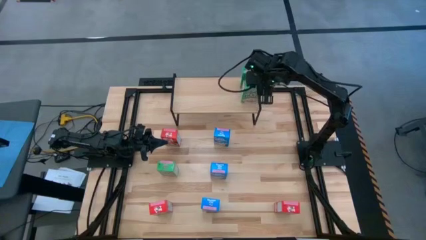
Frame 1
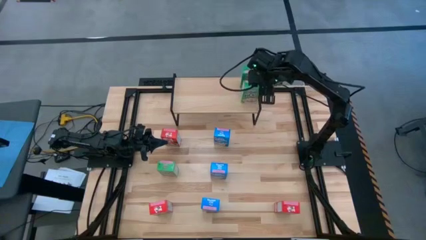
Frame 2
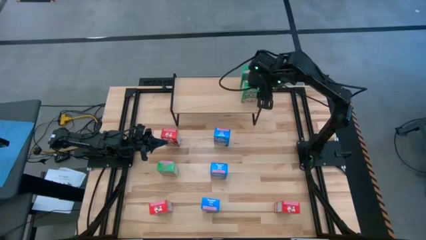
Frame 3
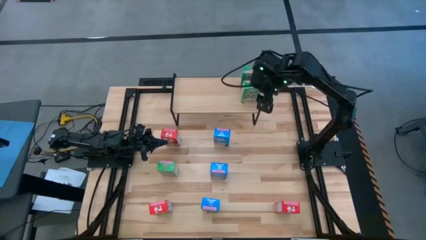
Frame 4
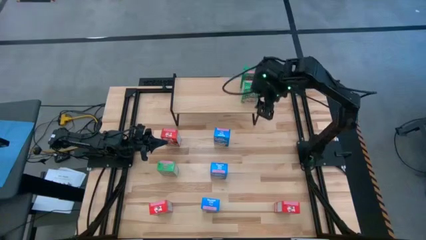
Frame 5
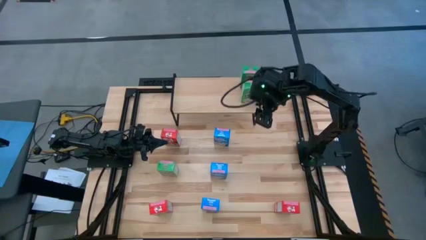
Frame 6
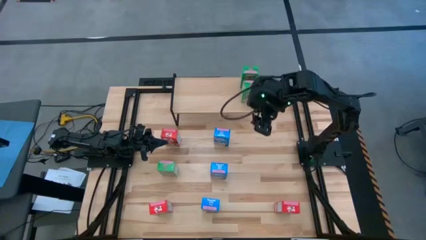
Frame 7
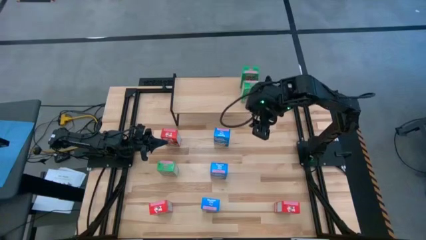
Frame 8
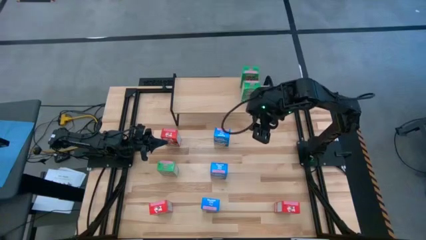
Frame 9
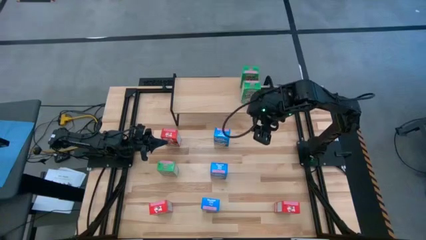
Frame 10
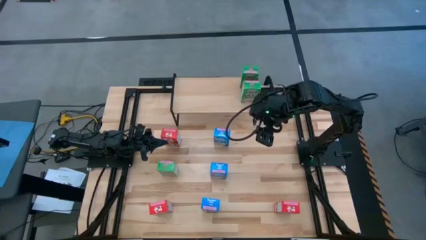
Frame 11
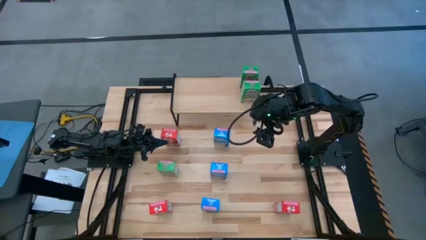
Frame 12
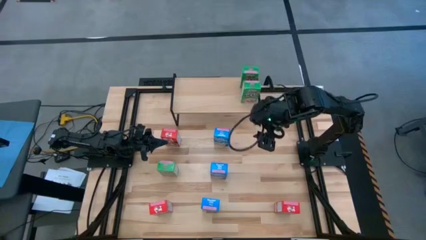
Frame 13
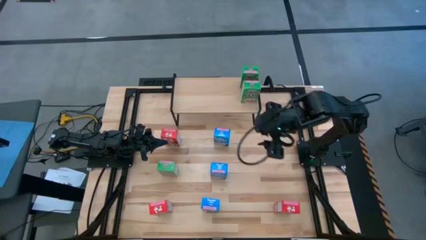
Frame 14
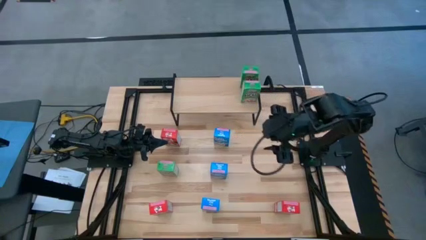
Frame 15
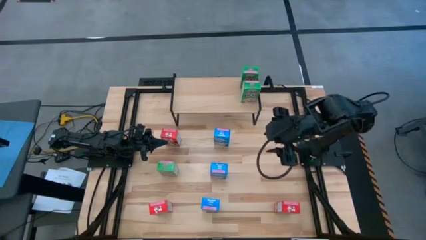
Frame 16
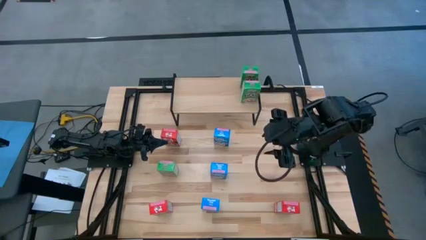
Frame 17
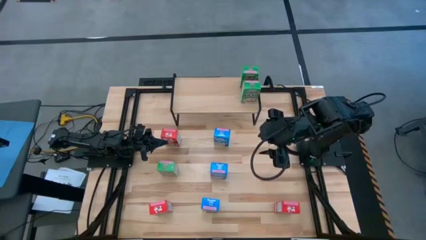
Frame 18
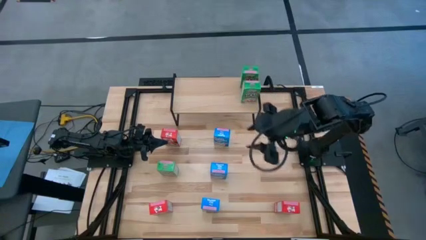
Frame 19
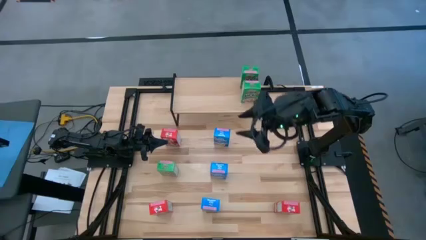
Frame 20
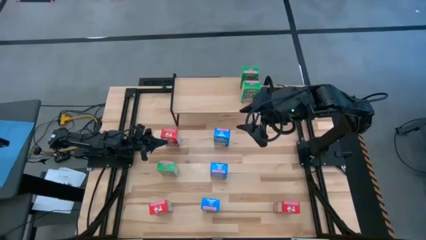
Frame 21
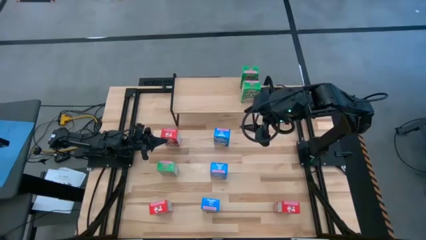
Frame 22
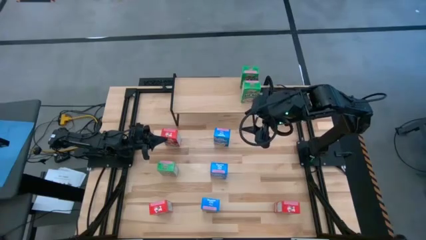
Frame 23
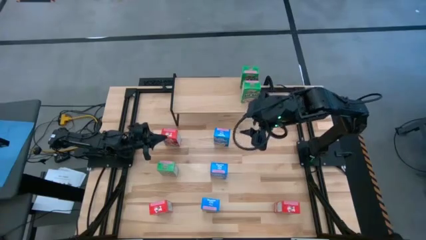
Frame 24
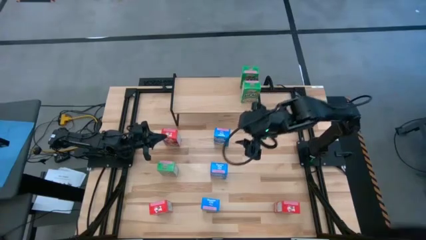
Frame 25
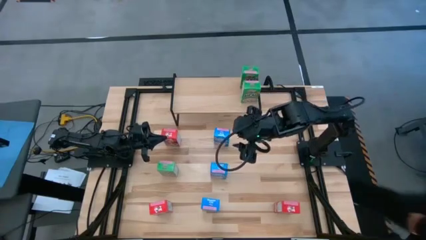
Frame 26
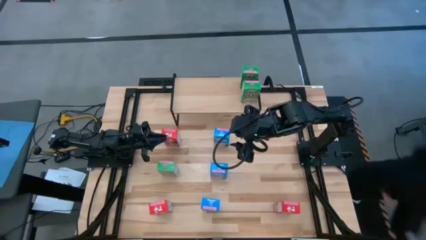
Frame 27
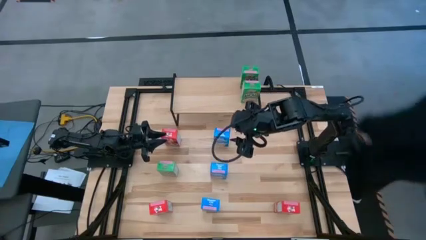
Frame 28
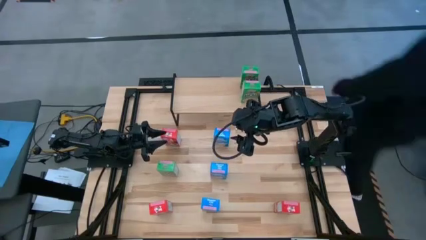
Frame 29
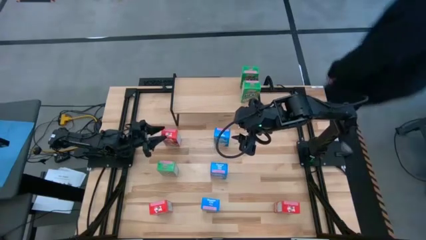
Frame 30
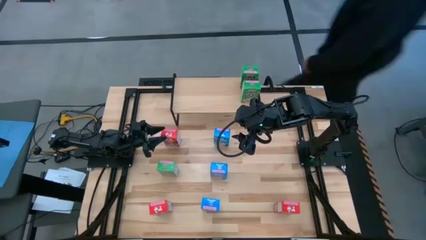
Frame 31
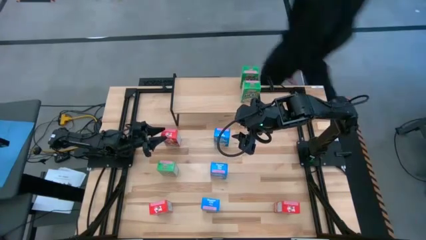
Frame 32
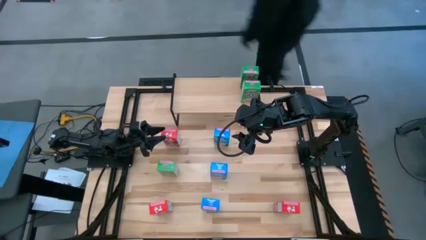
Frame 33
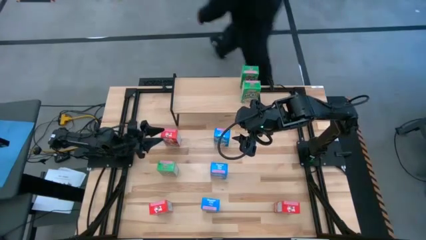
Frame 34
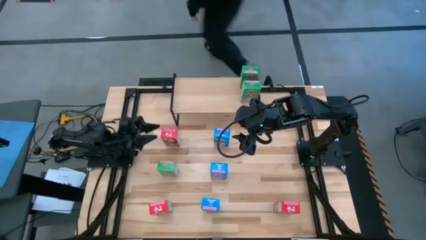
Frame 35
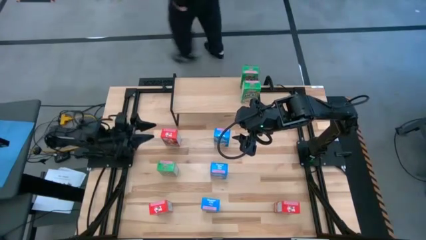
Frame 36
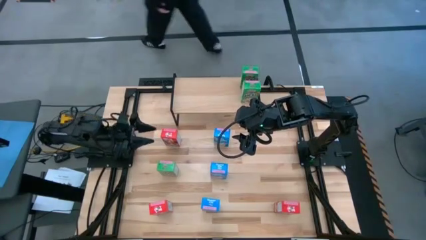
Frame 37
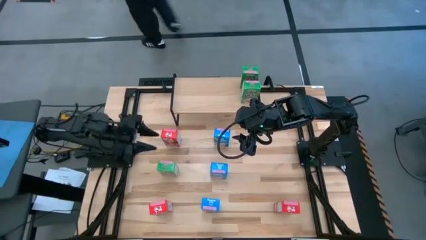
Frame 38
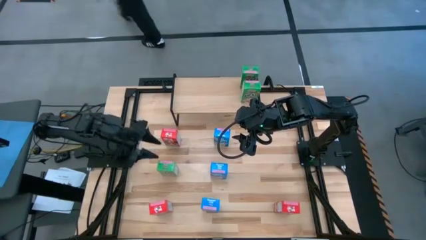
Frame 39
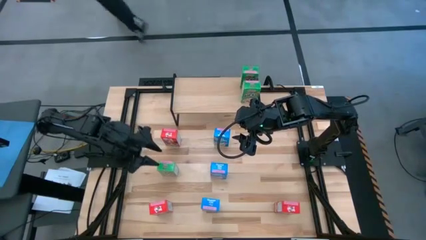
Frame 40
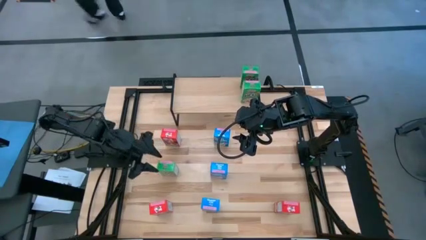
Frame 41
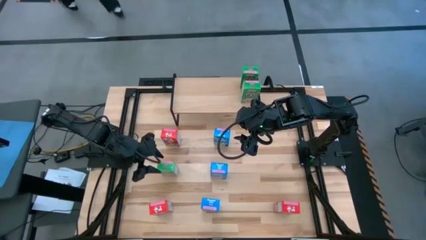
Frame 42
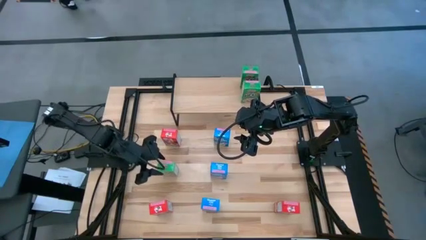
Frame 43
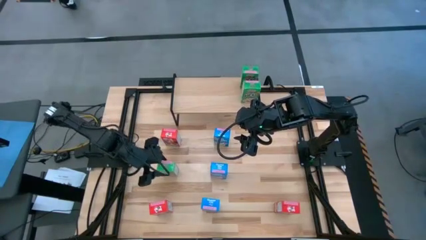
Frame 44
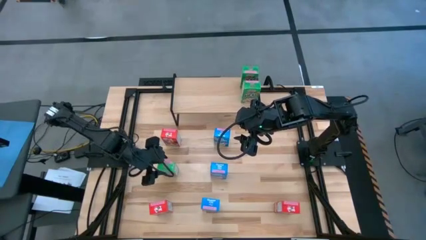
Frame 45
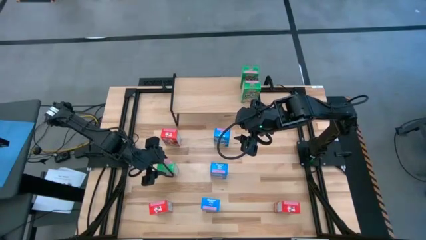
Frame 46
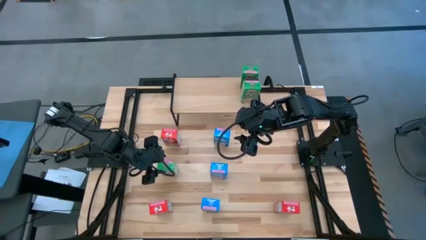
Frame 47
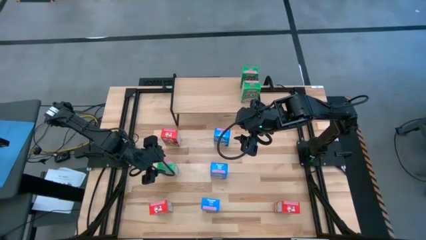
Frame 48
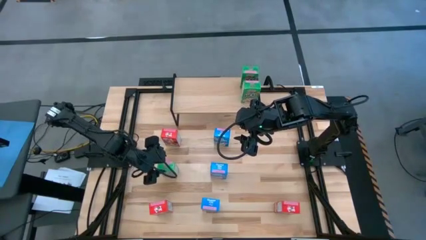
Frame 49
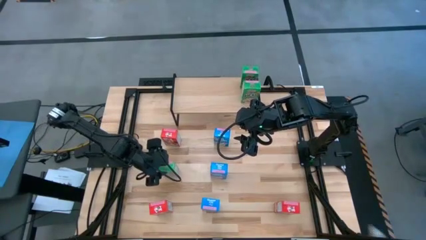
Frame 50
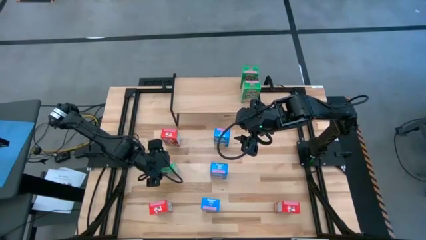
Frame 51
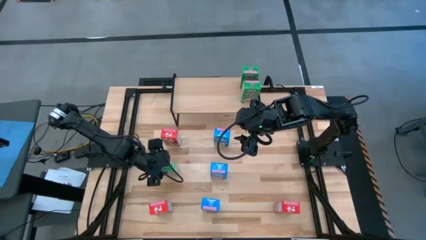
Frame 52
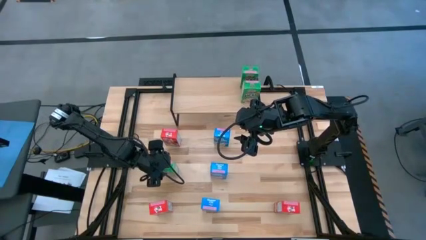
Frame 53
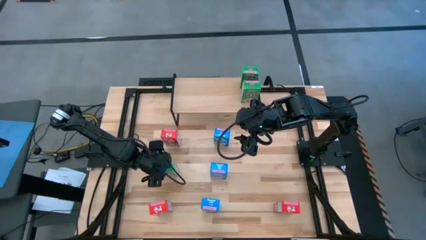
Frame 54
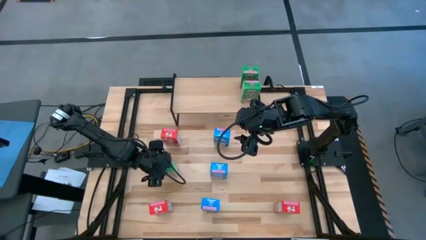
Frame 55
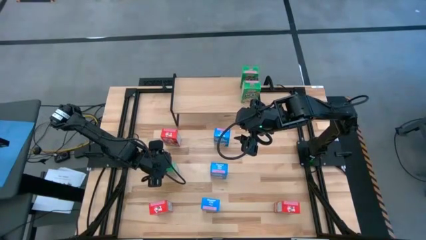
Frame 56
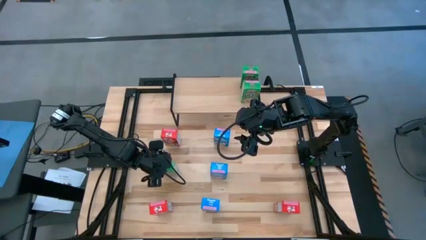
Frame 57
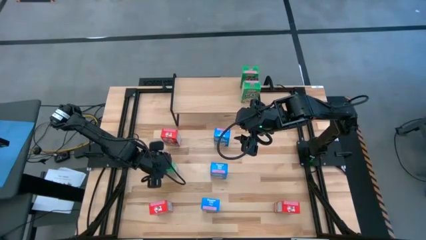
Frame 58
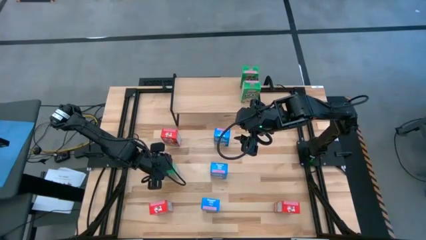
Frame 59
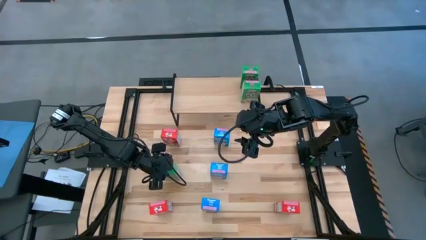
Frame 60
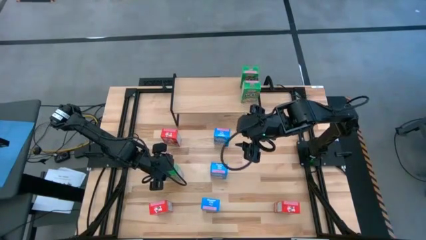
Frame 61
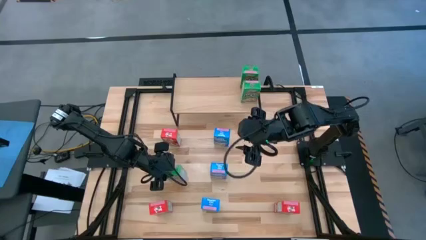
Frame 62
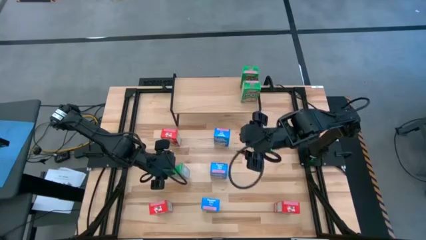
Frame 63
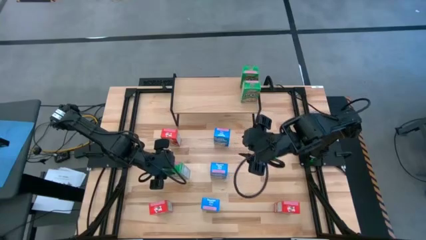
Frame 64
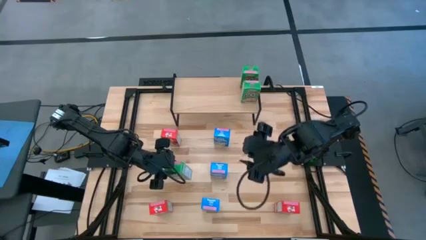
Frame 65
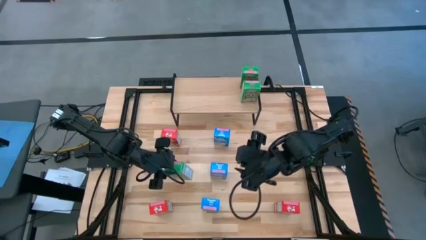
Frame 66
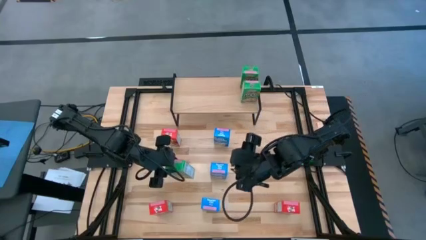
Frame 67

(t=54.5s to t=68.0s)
Task: Stack cereal on shelf
Put the green cereal box on the shelf aligned with the other green cereal box
